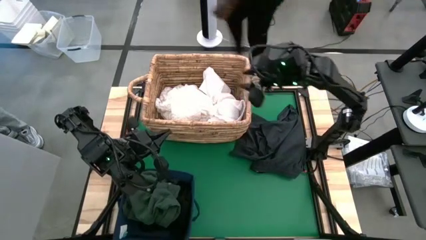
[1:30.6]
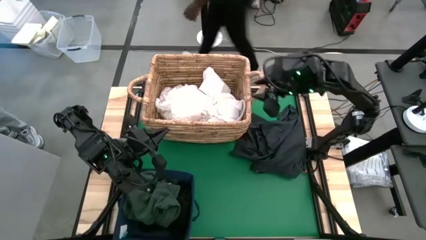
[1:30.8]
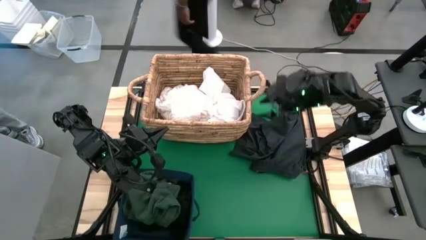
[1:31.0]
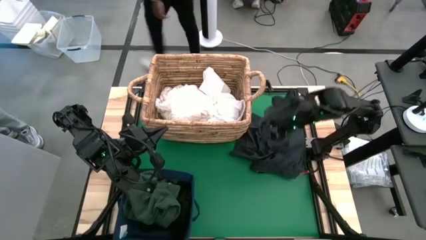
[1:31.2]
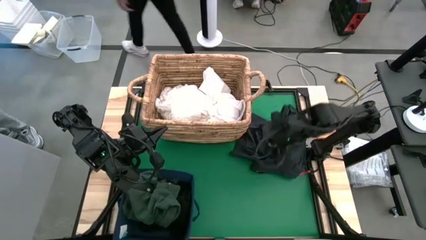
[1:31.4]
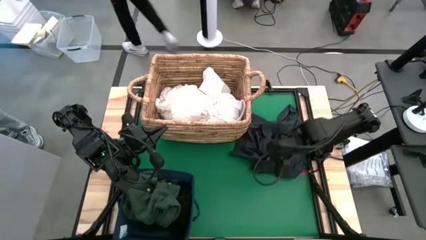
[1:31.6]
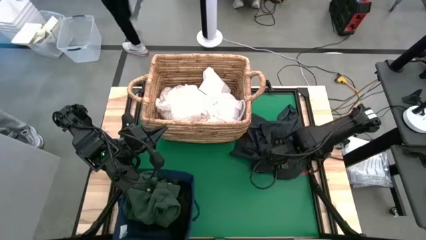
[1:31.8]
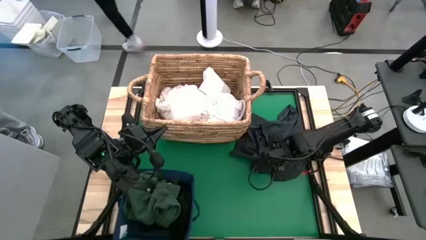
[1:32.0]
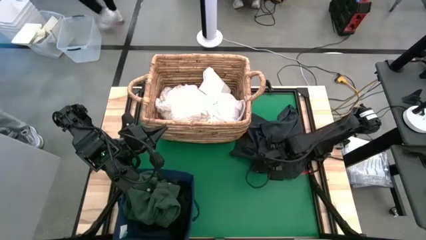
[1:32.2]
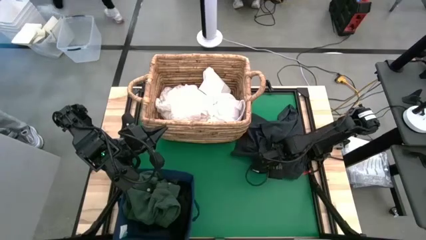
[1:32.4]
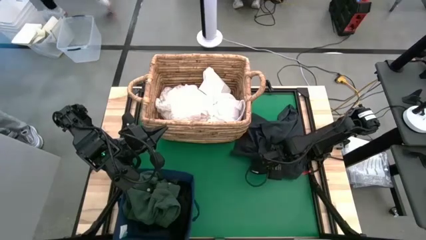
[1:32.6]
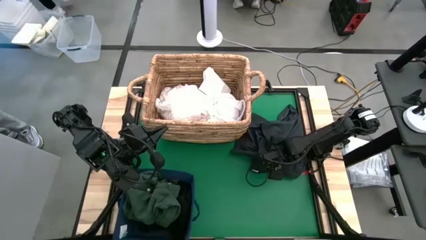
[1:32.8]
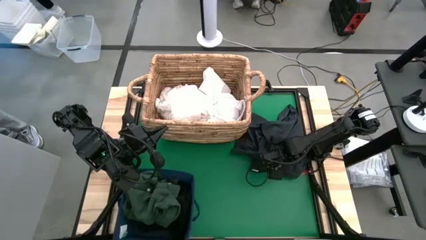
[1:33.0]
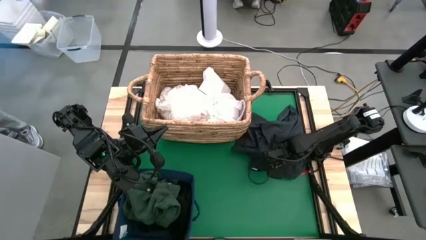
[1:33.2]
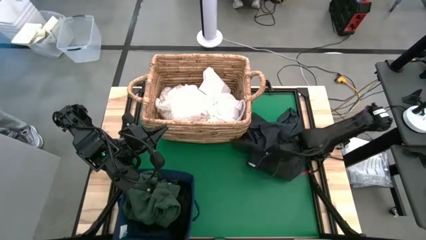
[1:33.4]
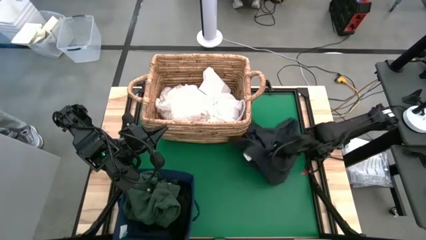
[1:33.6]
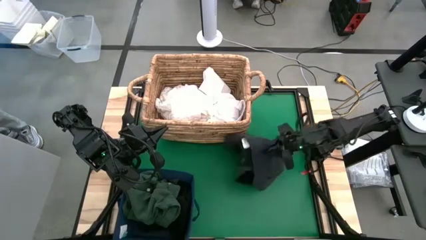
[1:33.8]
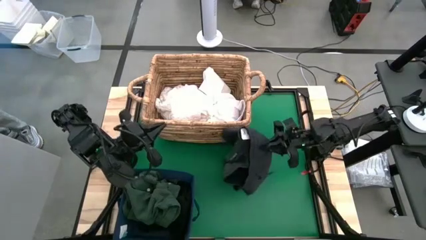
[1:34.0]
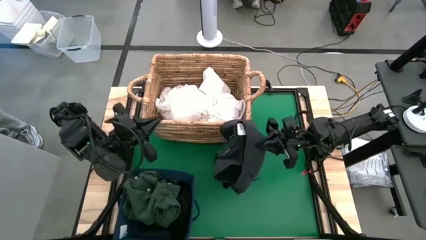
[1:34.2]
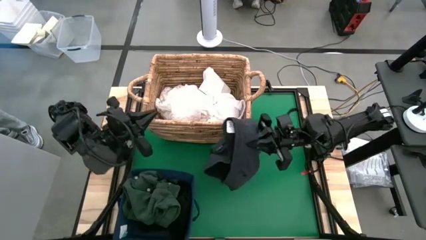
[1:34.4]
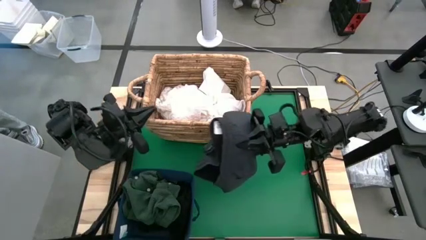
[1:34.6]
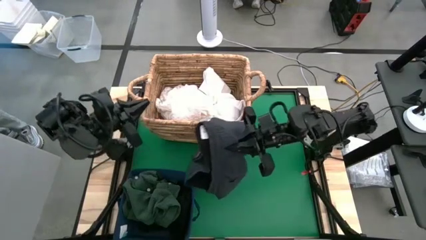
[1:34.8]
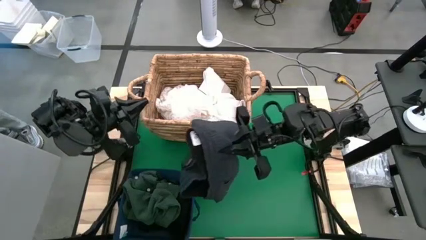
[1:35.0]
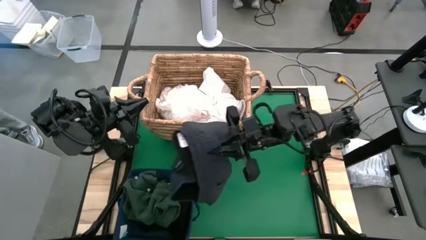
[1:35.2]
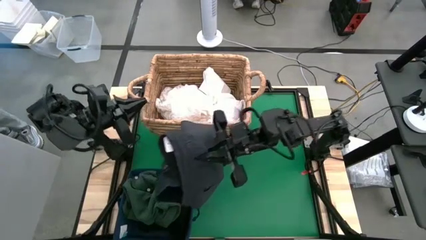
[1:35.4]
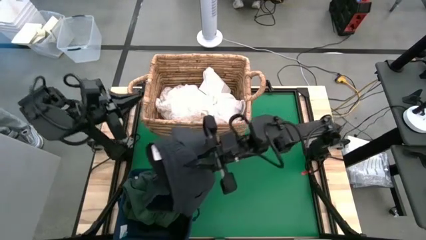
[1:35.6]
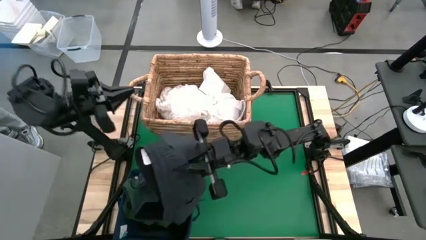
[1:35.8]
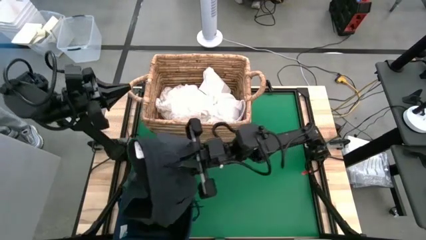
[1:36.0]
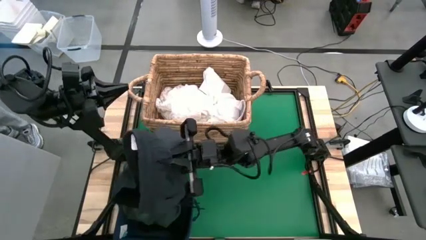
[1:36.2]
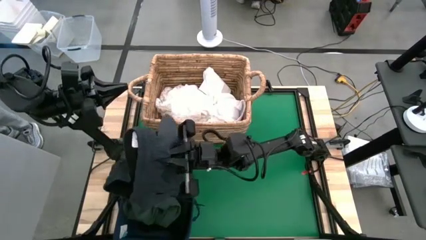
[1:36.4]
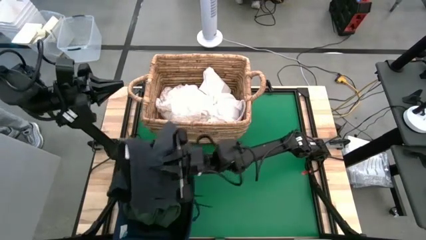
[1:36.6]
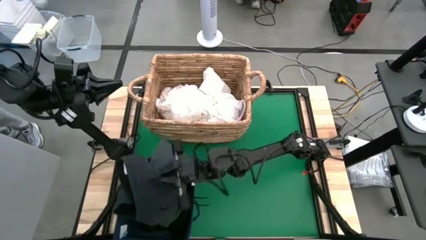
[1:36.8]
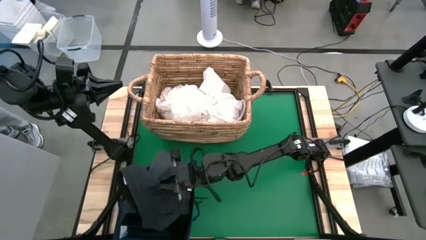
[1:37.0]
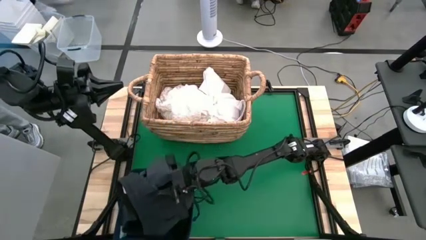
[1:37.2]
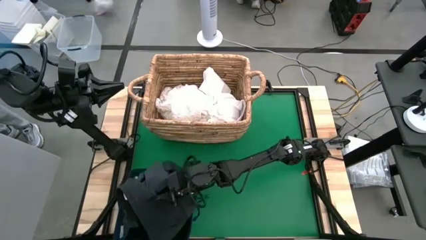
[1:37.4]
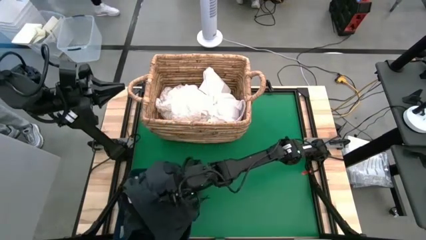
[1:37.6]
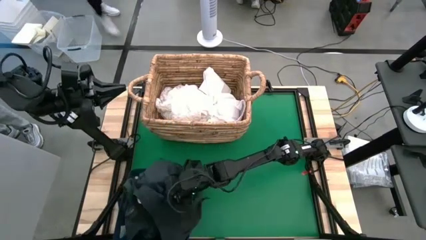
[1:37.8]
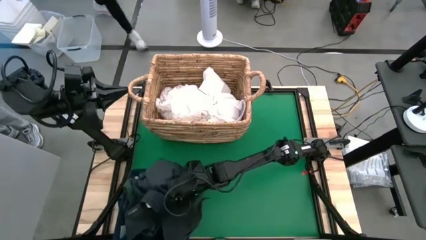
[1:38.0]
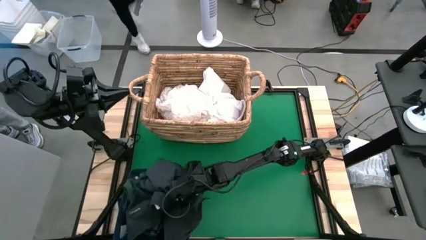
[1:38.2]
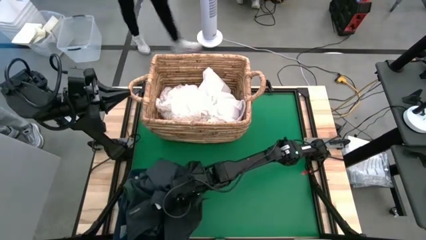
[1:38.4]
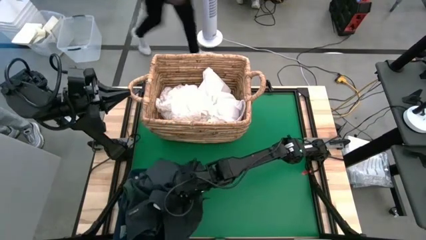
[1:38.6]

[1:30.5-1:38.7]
Put the black shorts into the laundry bin

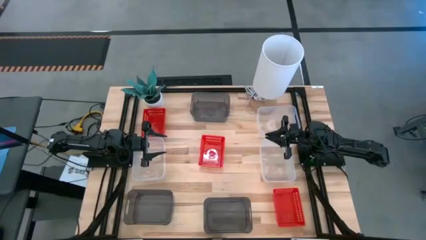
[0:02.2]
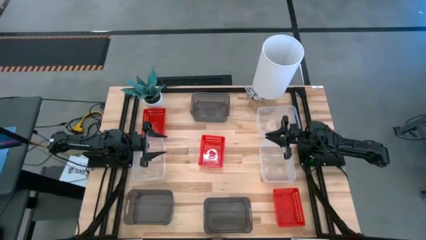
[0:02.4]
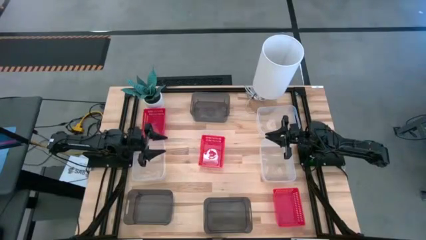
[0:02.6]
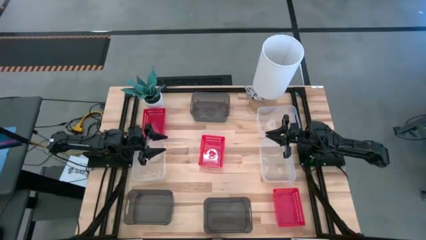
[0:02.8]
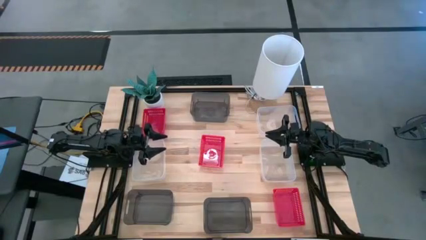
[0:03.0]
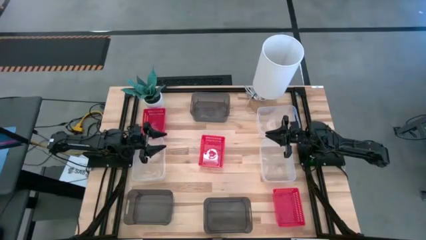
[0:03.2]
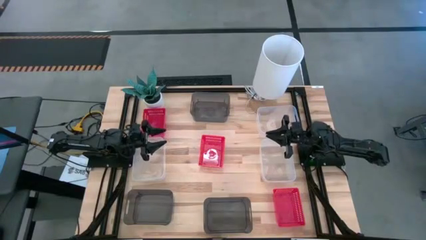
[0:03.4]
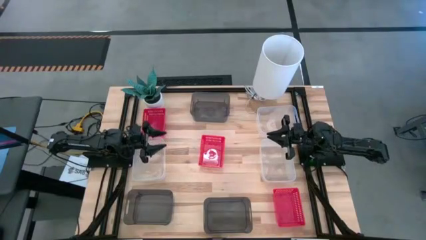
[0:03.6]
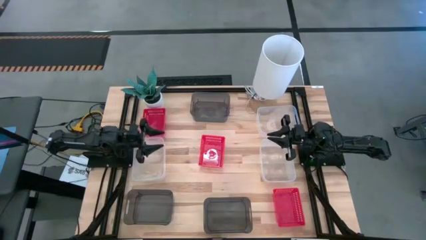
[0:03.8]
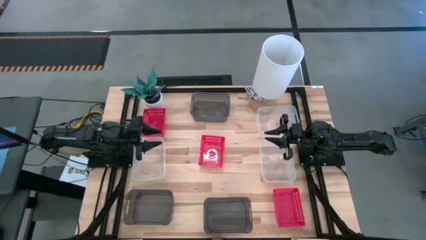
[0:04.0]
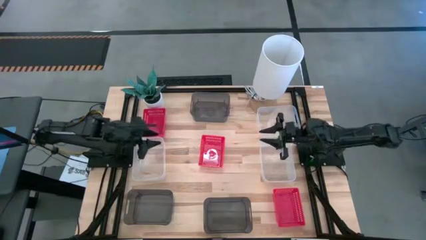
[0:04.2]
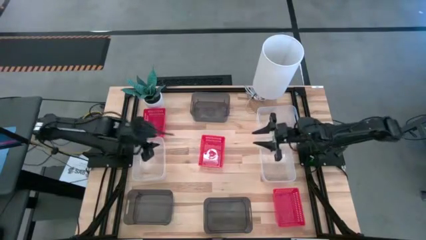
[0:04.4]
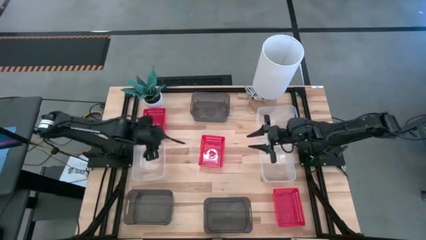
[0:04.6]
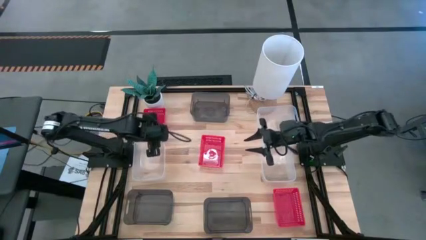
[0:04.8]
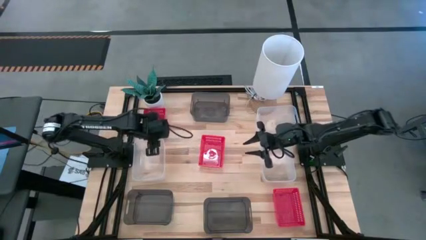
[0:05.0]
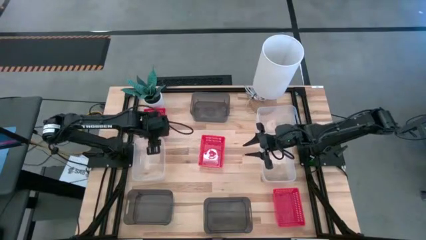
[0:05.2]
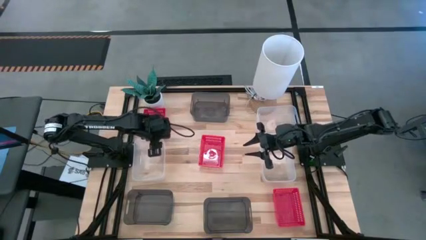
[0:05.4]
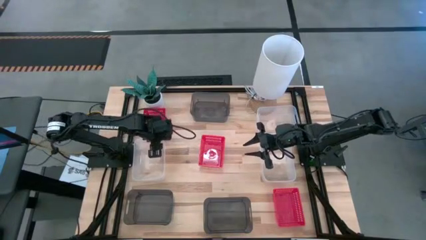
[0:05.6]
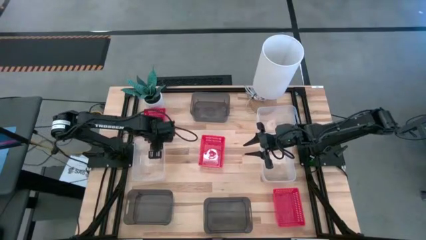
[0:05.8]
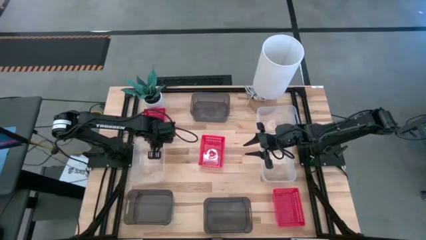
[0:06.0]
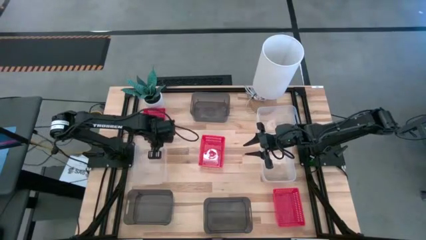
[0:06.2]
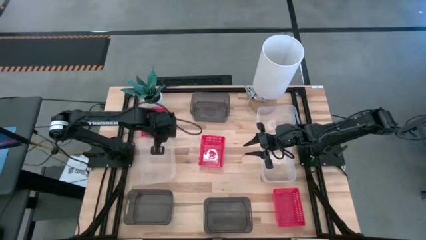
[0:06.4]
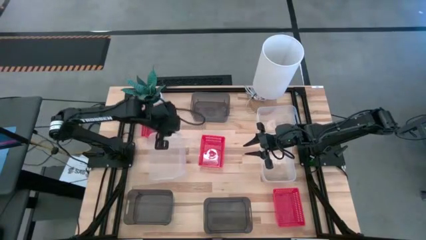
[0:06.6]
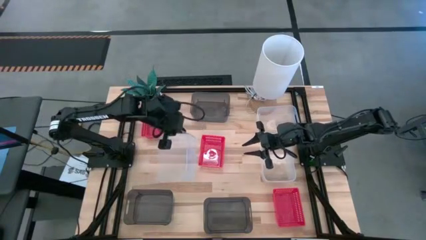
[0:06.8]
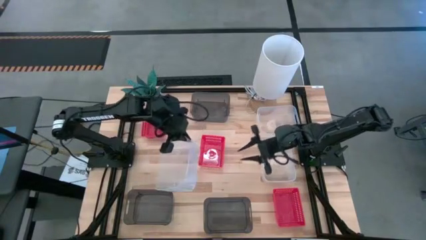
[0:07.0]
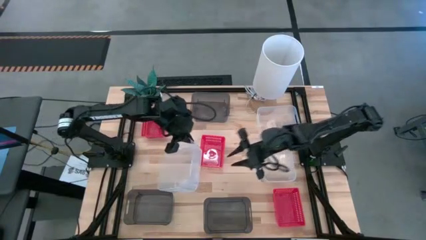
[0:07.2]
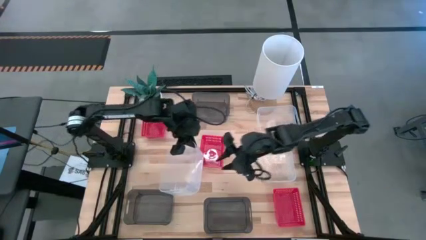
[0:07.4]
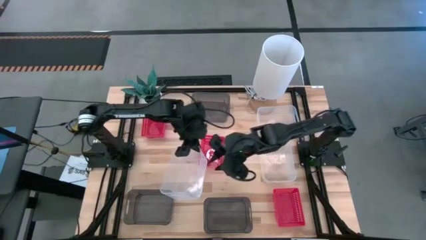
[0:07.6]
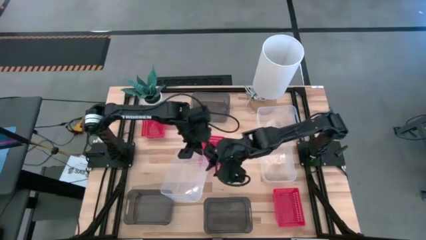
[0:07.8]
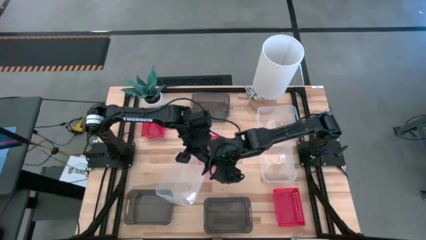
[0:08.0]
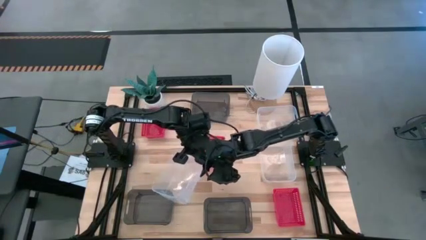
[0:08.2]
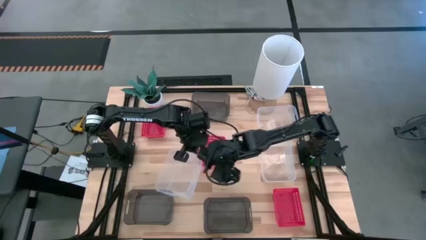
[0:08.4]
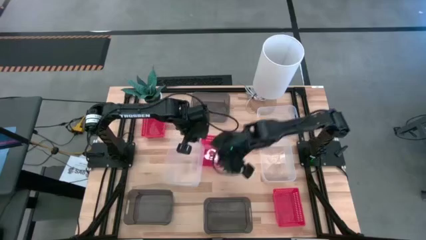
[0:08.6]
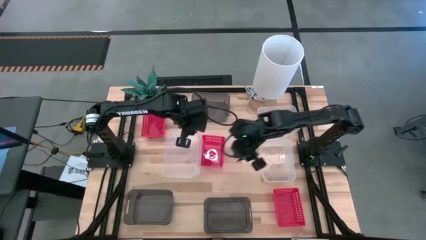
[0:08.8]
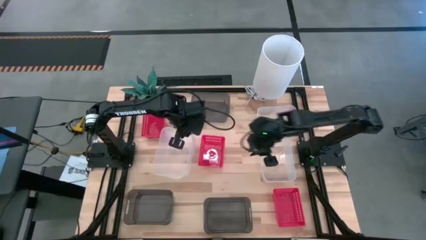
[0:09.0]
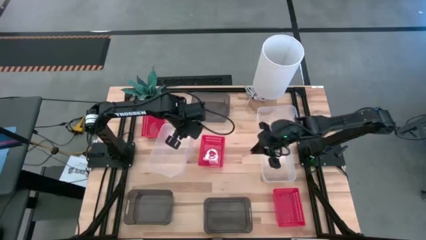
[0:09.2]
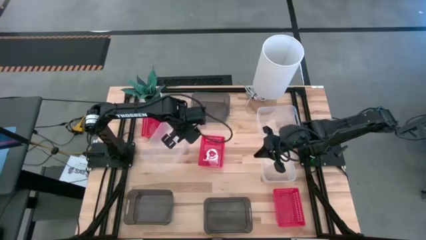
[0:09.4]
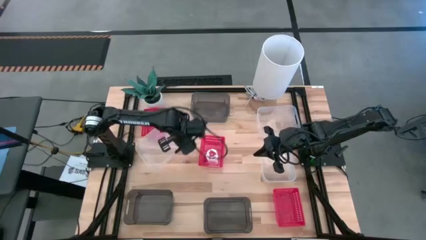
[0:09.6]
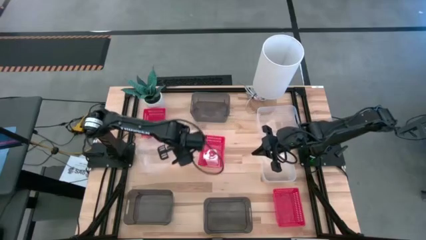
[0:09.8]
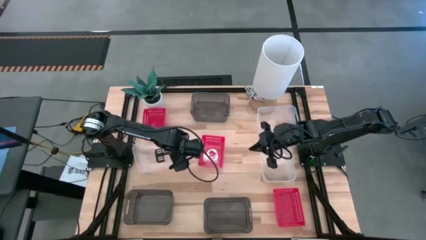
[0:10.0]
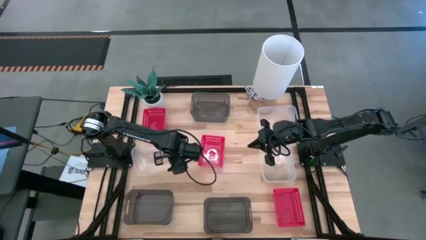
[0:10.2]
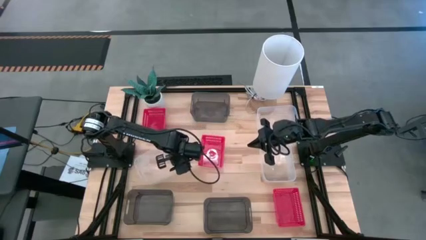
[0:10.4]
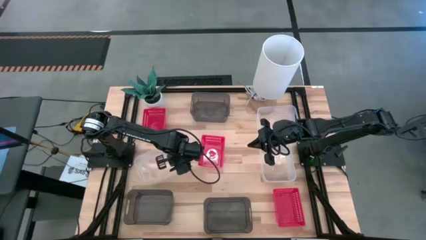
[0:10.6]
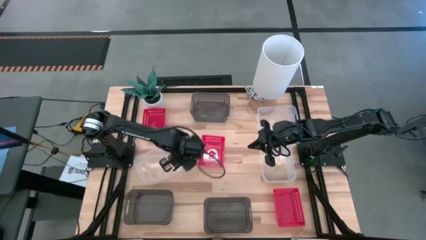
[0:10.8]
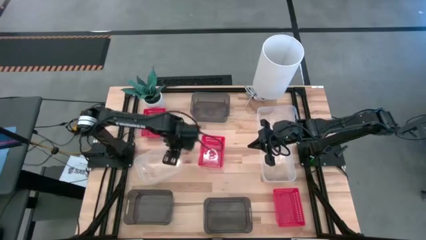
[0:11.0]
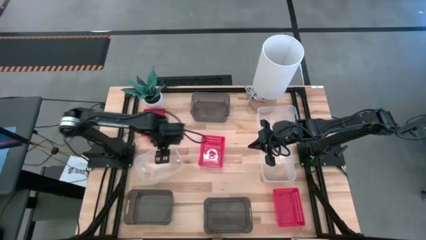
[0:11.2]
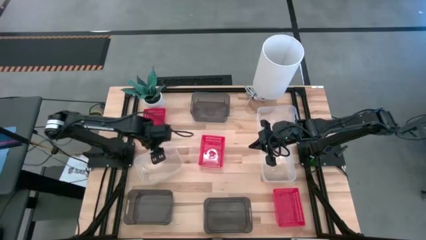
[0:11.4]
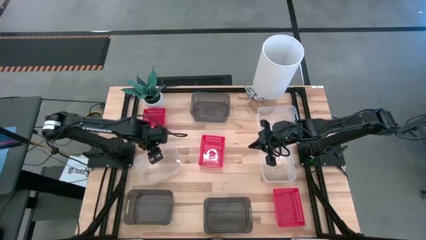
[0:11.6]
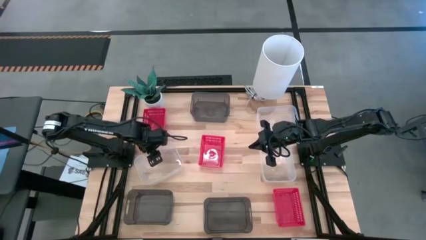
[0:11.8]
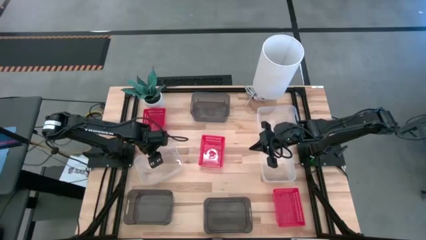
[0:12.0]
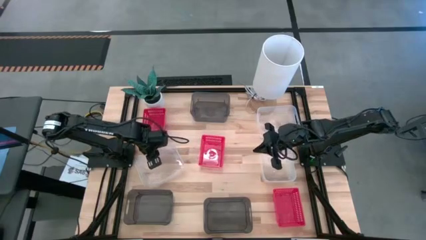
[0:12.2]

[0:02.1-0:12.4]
Stack the bottom left transparent bin on top of the bottom right transparent bin
